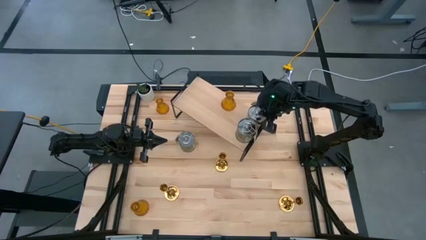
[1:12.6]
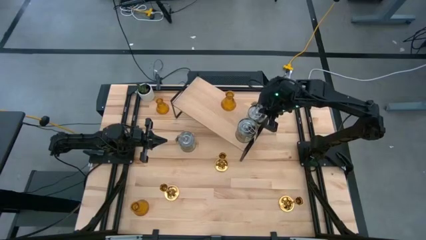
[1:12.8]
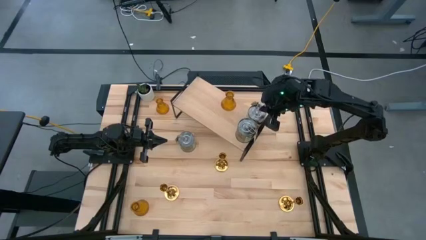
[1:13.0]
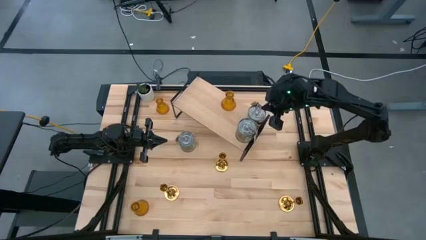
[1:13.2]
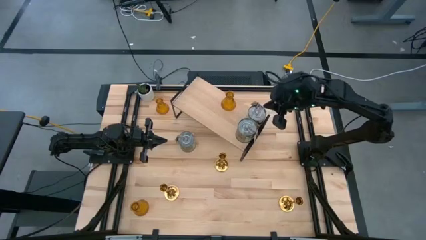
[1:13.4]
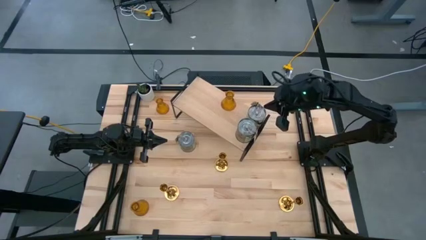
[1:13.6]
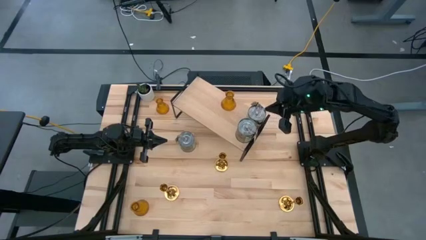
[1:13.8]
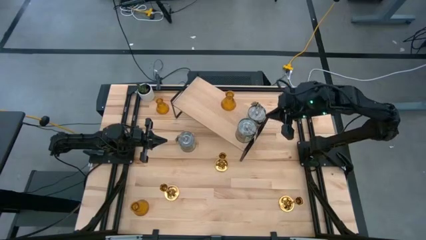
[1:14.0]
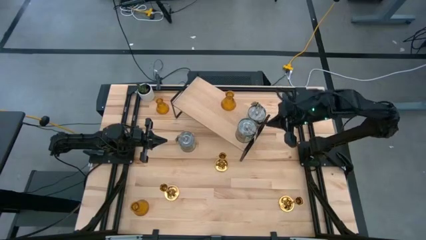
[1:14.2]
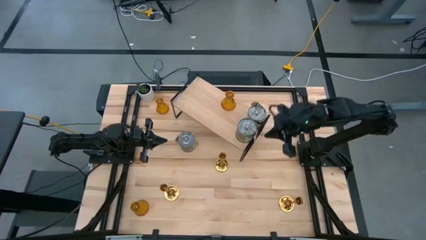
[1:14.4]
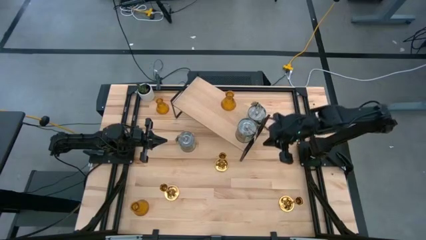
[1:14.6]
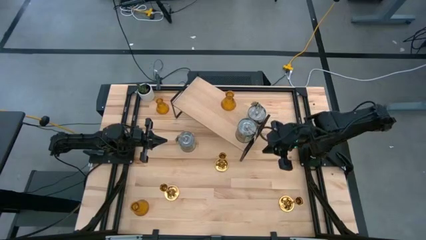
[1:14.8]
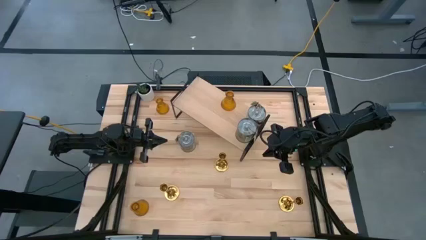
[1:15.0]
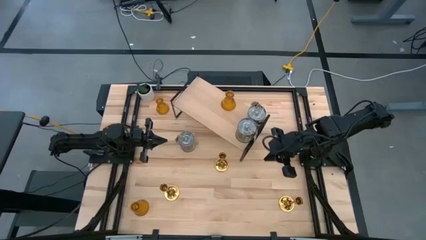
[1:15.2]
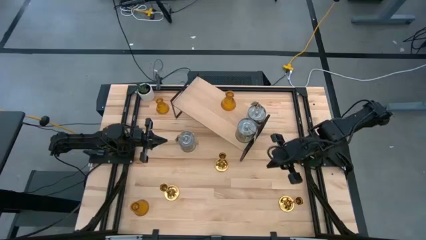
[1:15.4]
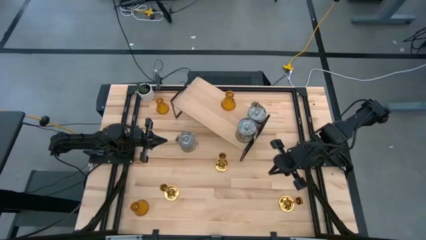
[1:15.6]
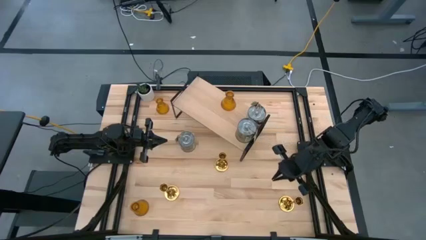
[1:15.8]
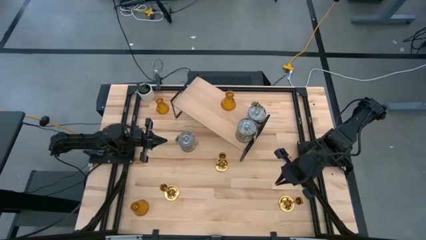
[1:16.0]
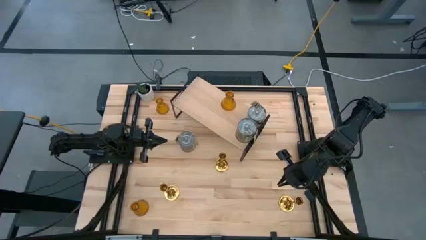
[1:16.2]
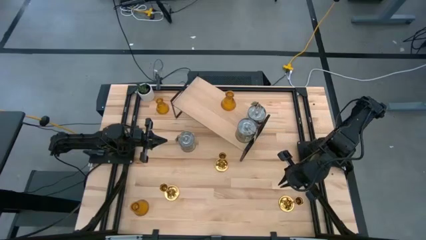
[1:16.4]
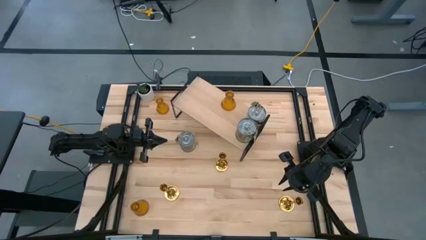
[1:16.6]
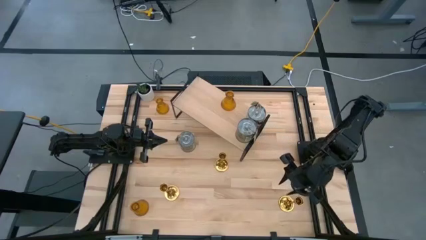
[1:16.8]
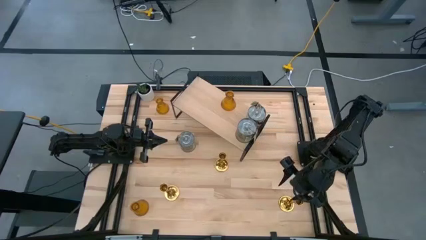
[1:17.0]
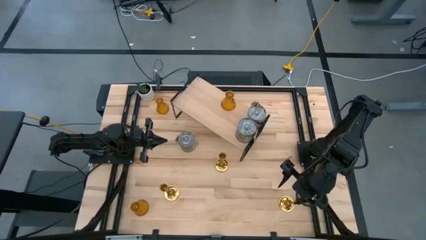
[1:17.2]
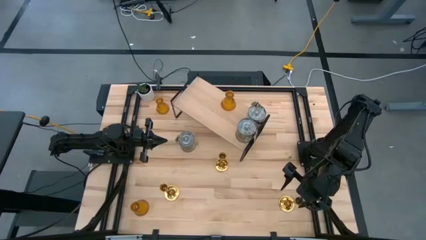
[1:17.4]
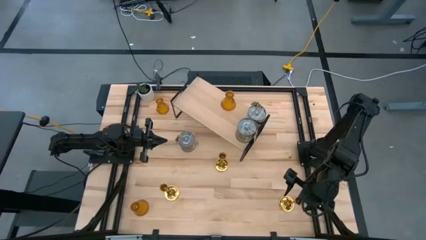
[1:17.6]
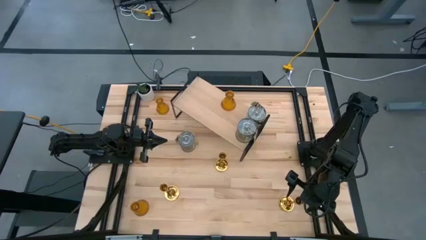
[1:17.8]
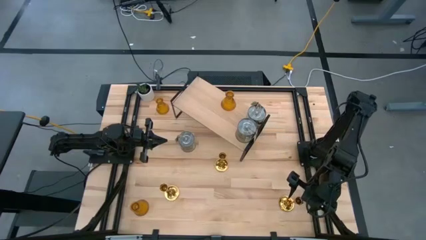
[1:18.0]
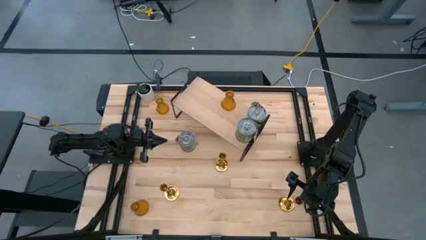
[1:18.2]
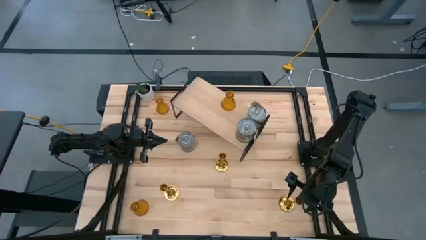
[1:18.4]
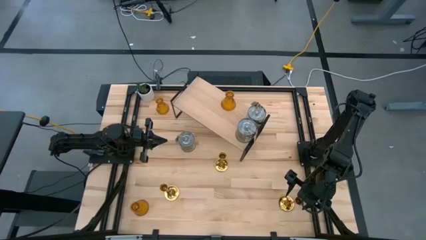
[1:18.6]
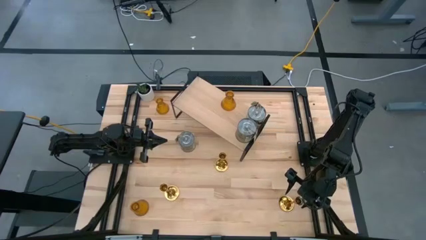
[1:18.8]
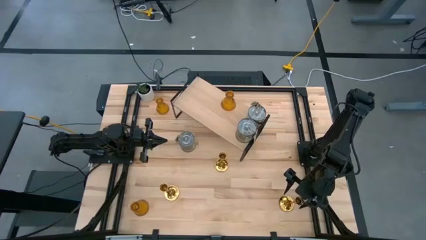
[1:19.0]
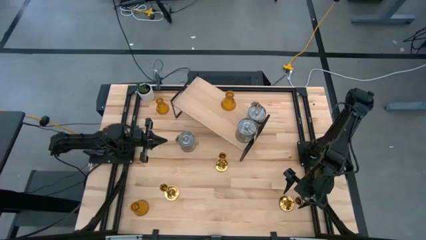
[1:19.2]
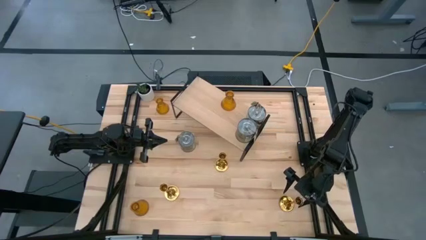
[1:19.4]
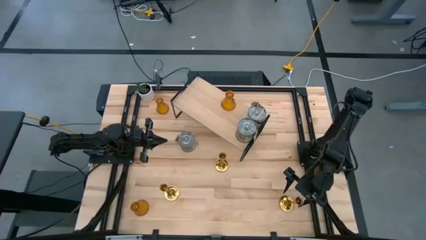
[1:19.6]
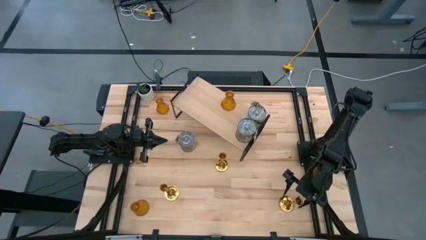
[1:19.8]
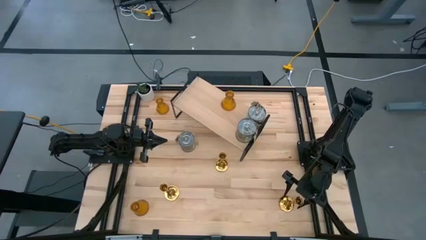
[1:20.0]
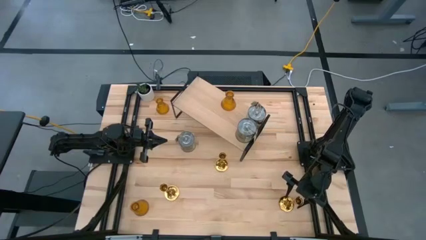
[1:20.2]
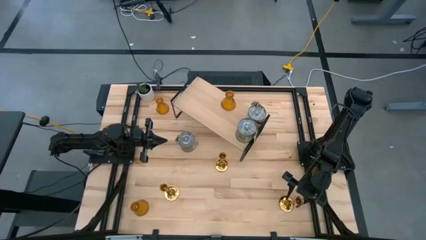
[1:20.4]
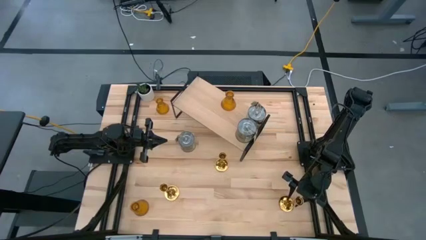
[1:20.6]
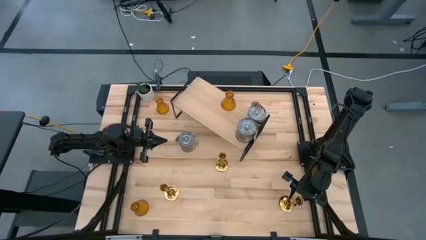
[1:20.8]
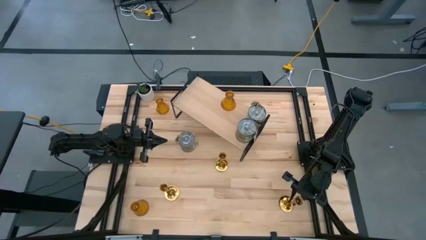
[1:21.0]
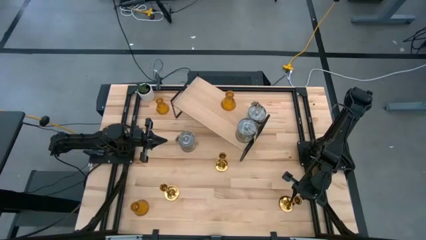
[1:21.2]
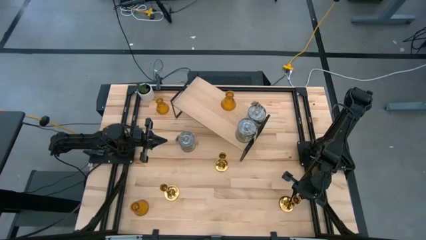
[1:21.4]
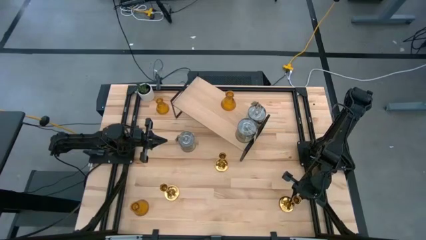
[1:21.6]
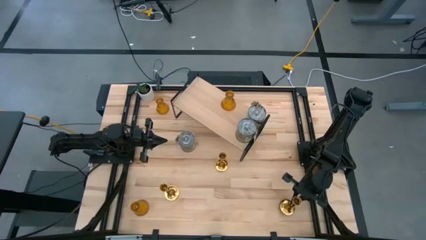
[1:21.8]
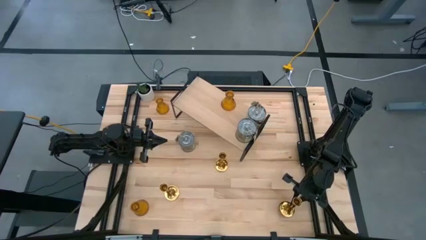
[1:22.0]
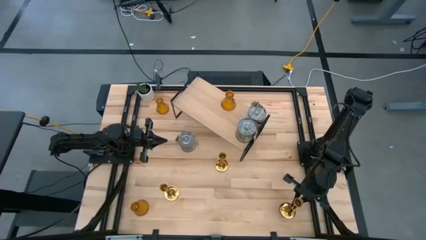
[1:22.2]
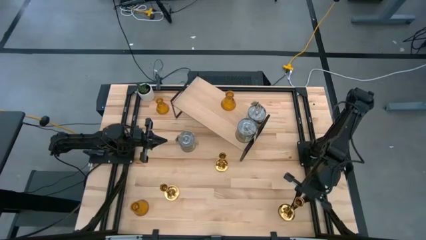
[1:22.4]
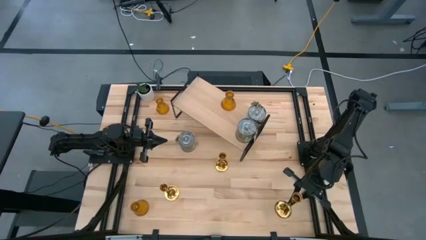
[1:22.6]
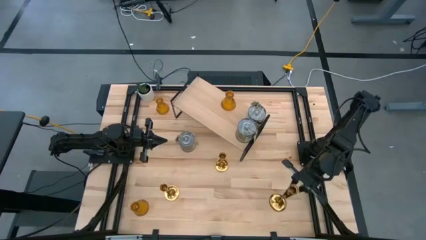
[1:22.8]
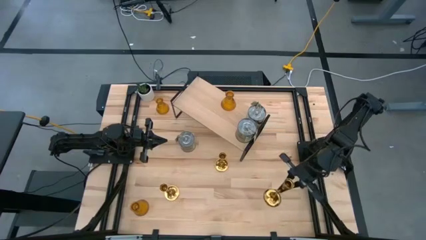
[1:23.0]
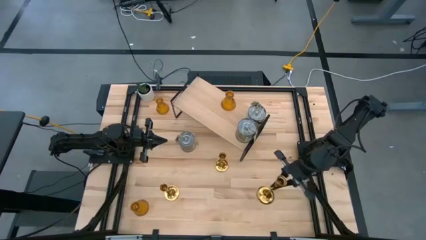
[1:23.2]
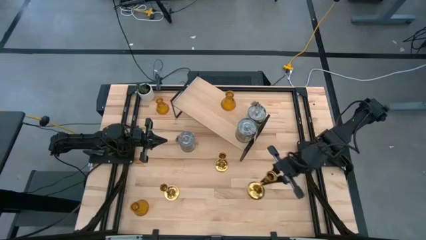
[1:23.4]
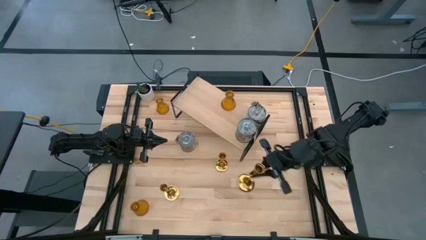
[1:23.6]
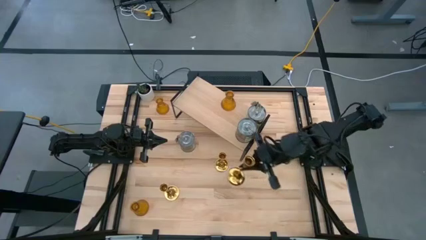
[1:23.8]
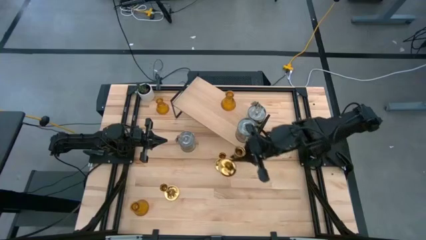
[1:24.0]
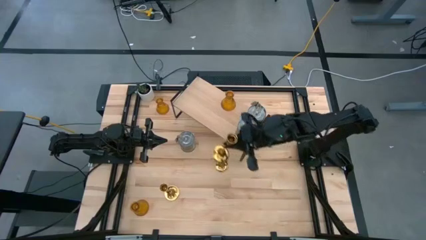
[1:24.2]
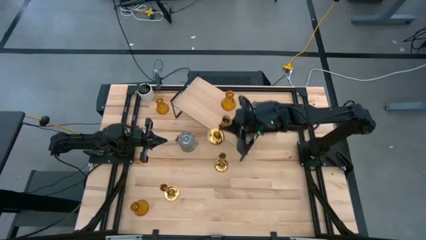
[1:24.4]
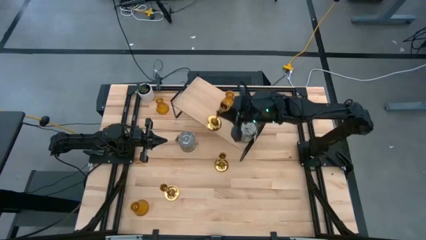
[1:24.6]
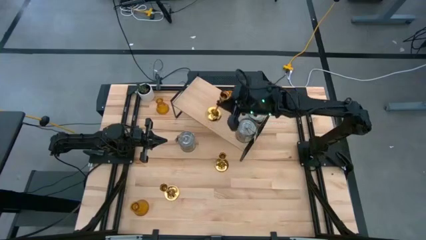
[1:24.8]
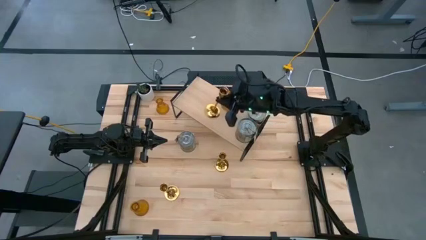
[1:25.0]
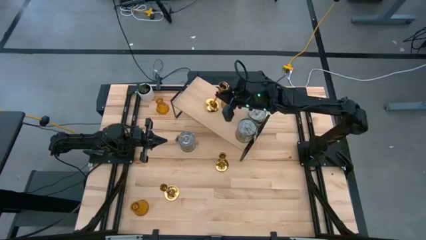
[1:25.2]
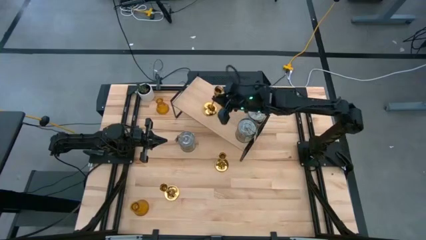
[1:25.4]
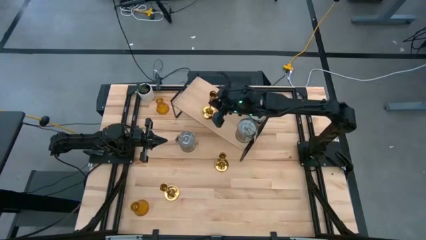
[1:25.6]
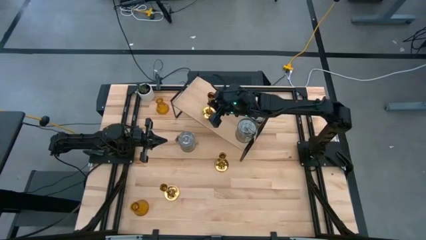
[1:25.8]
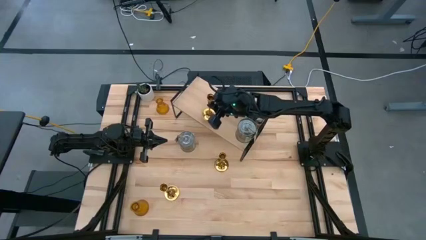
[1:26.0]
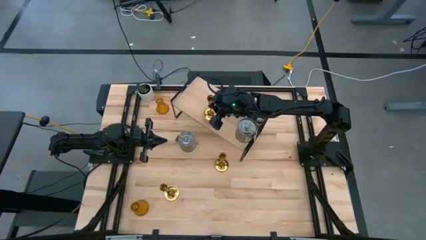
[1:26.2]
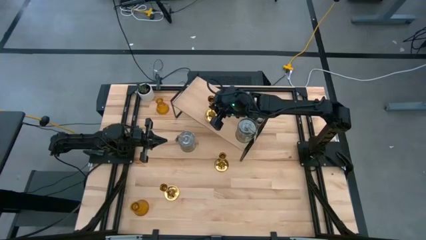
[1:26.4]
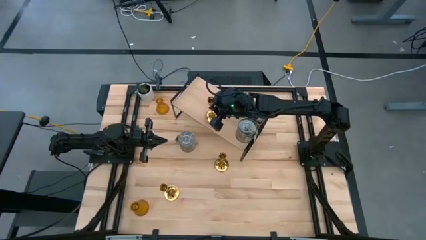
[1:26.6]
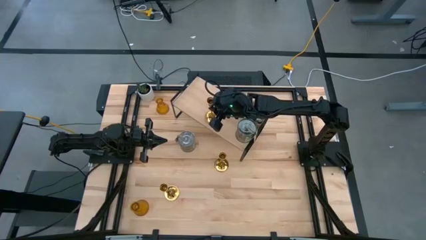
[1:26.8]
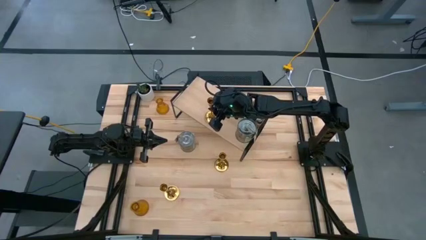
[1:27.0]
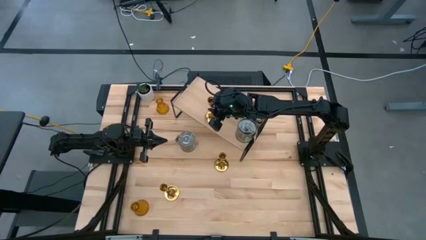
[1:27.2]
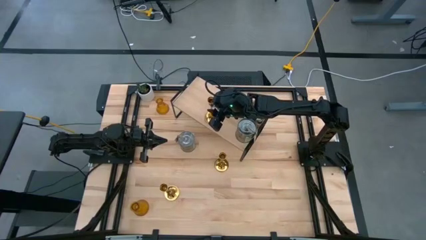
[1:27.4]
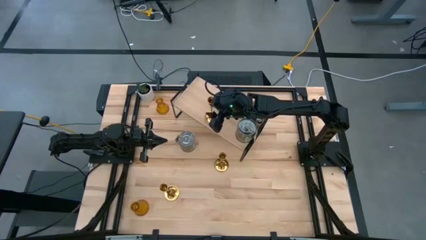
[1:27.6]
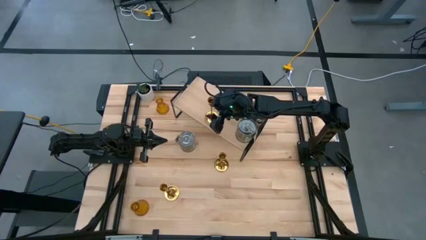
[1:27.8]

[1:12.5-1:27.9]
Task: Pick & Place candle stick holders
Put the bottom right gold candle holder on the shelf
